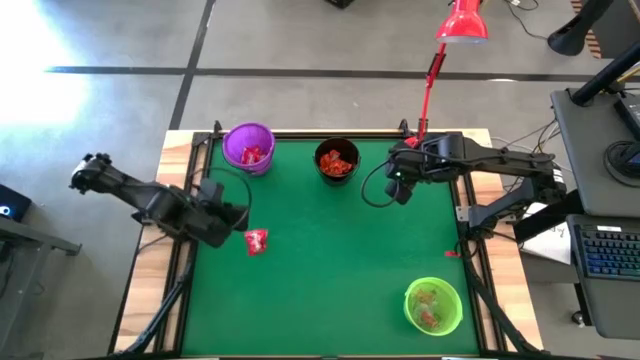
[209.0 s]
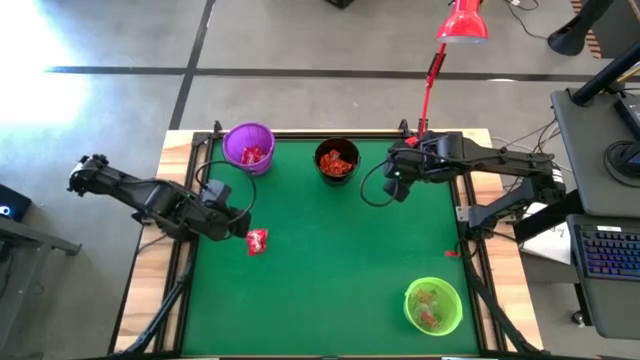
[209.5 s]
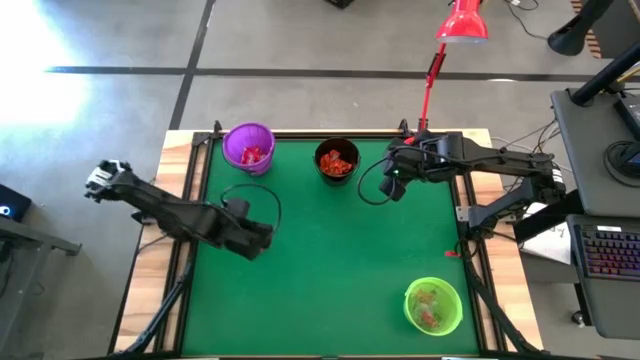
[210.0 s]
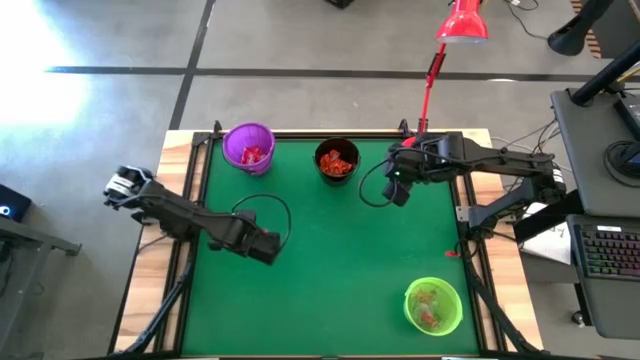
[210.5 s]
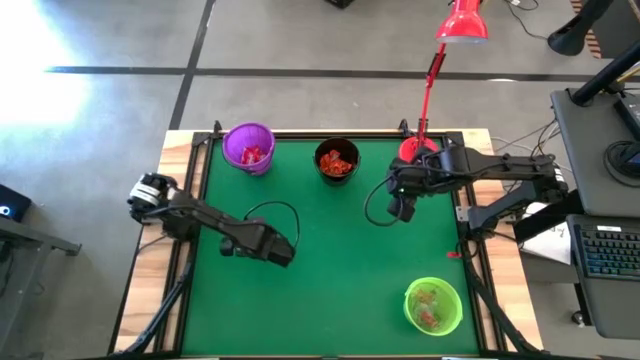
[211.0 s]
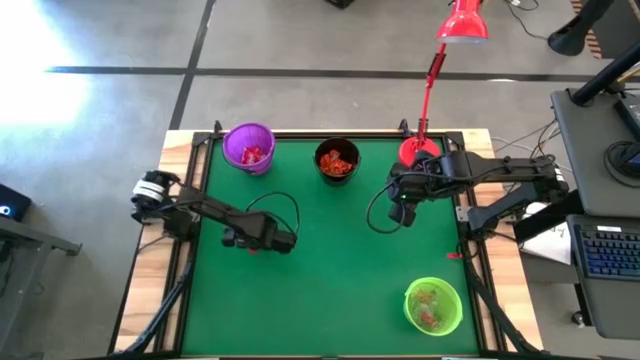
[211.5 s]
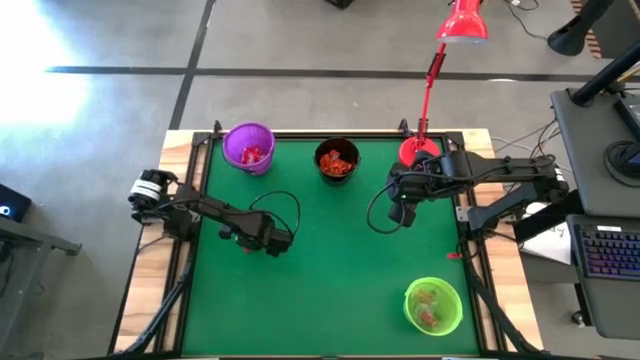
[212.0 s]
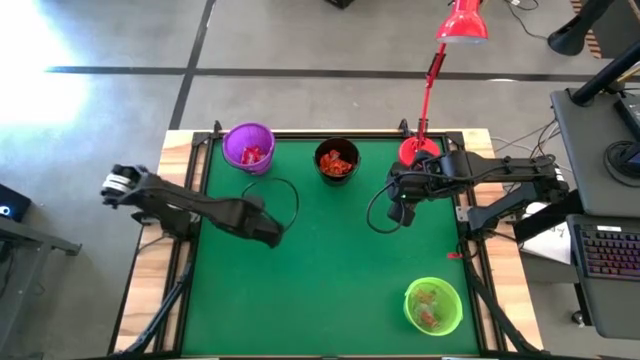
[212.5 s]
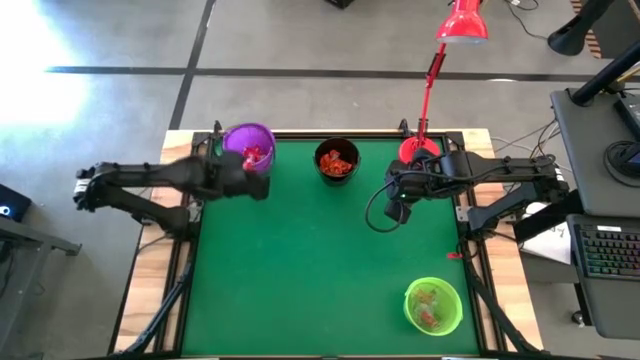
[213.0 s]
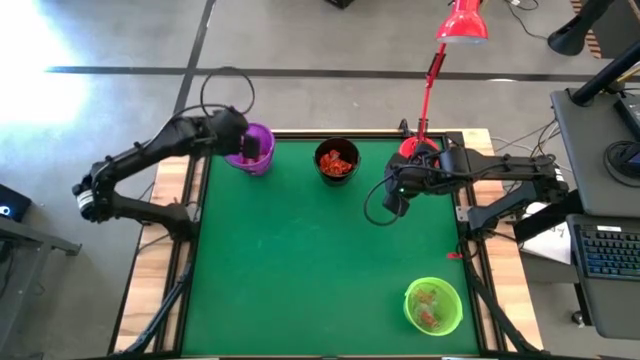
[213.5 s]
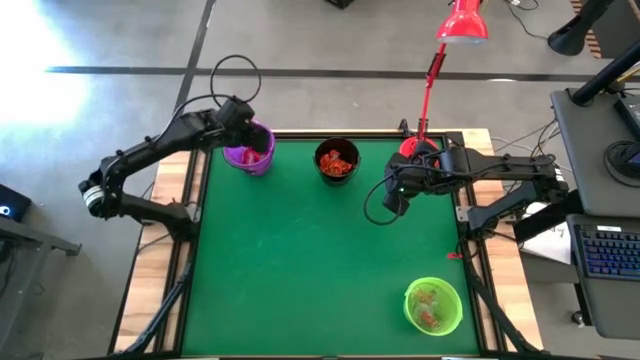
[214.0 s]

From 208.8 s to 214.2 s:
Task: Sort candy
Put the red candy into the purple bucket

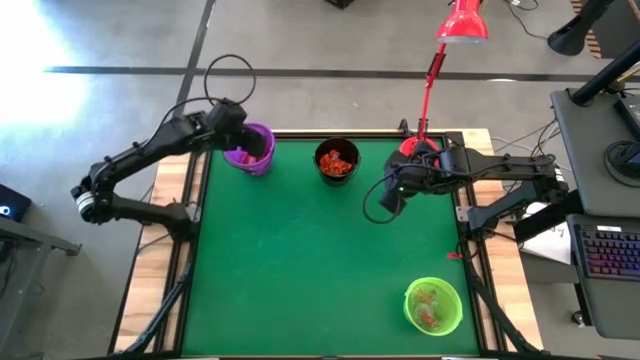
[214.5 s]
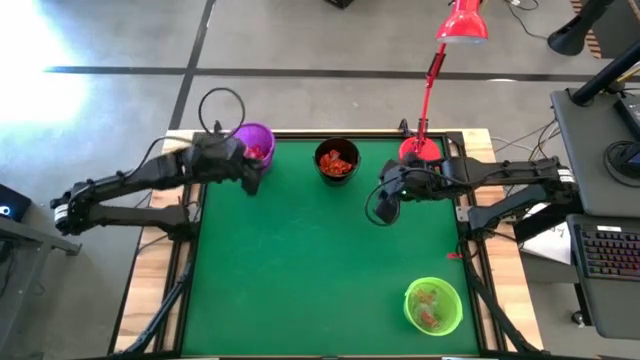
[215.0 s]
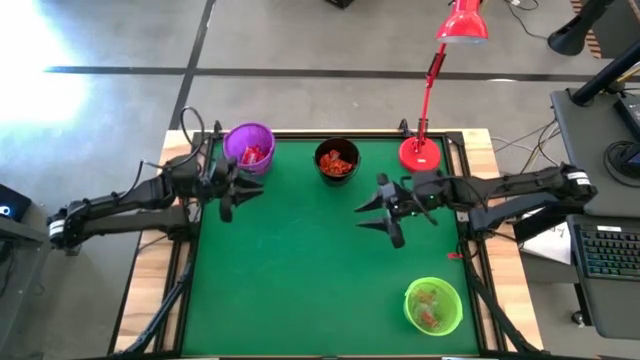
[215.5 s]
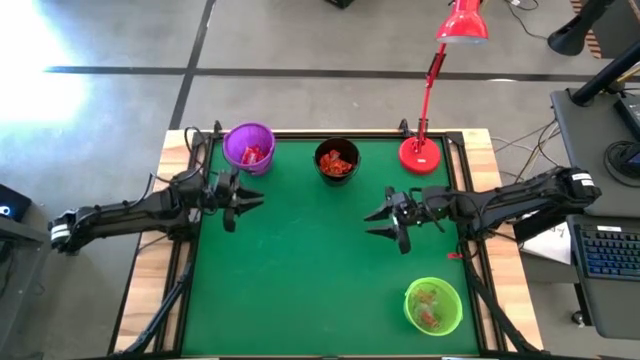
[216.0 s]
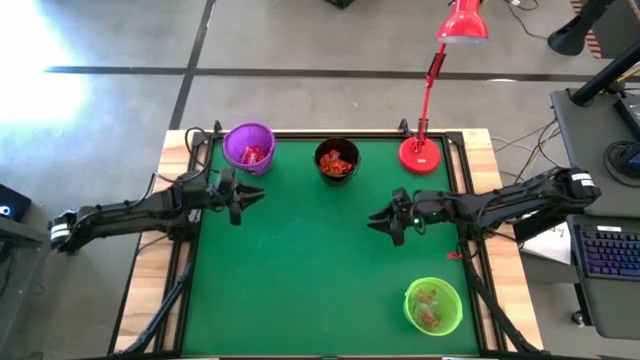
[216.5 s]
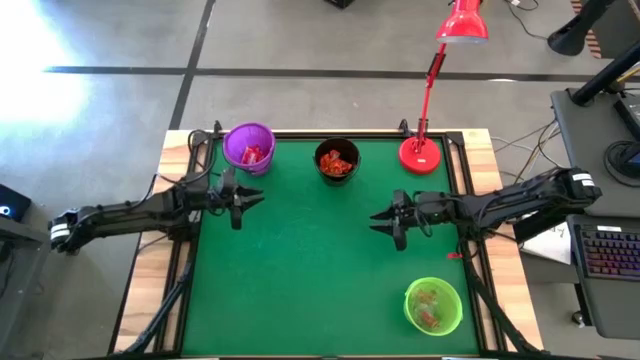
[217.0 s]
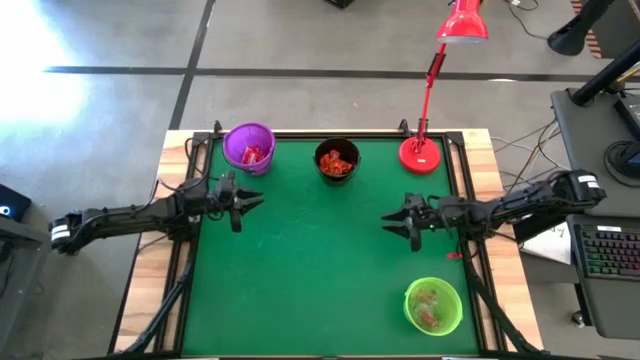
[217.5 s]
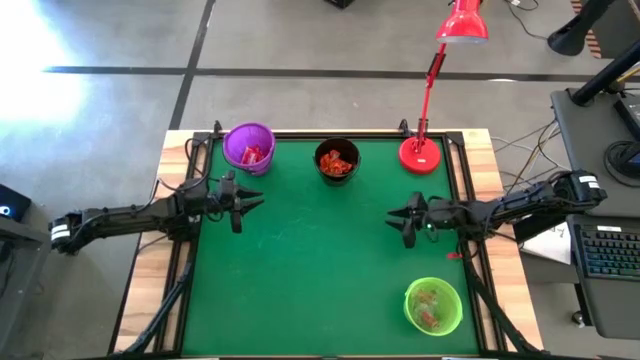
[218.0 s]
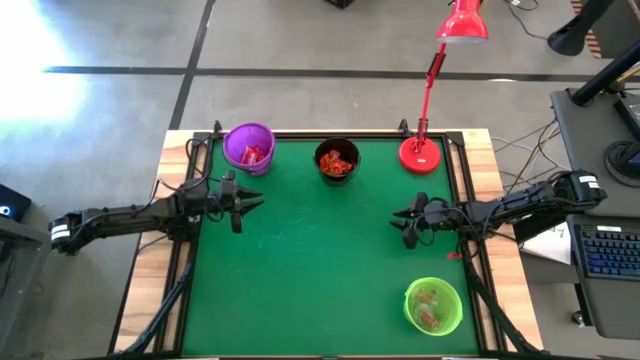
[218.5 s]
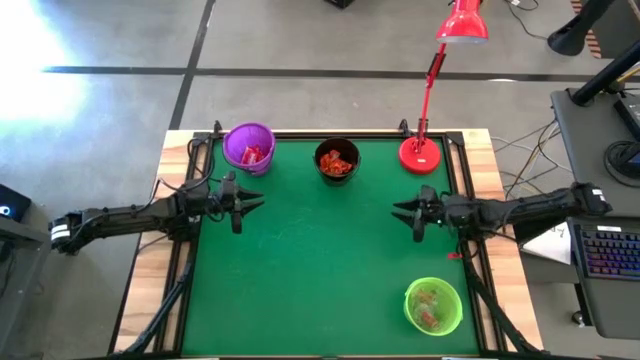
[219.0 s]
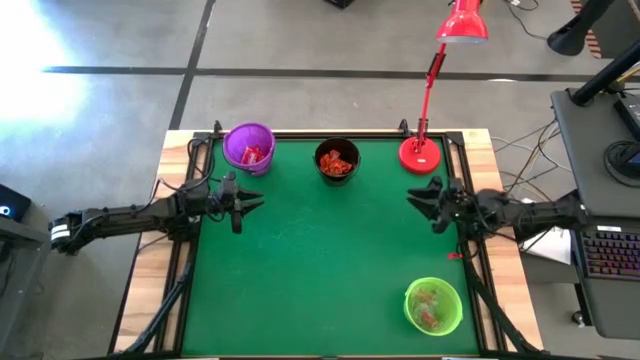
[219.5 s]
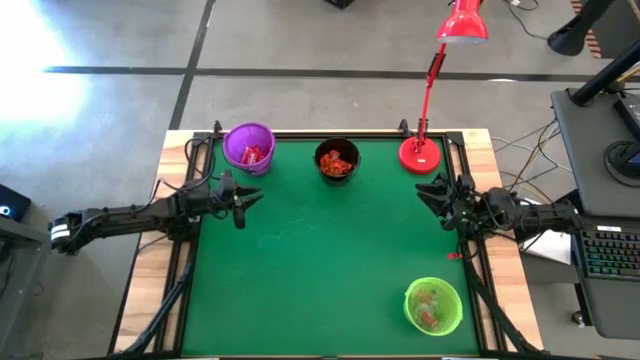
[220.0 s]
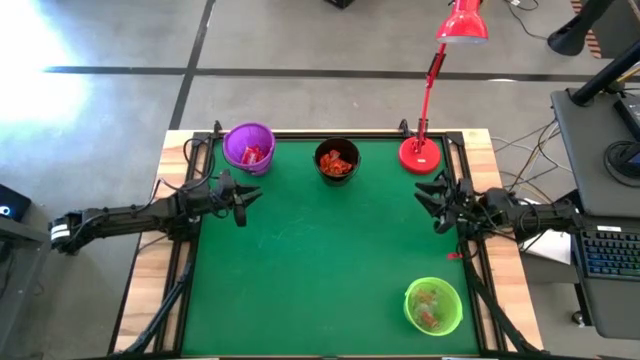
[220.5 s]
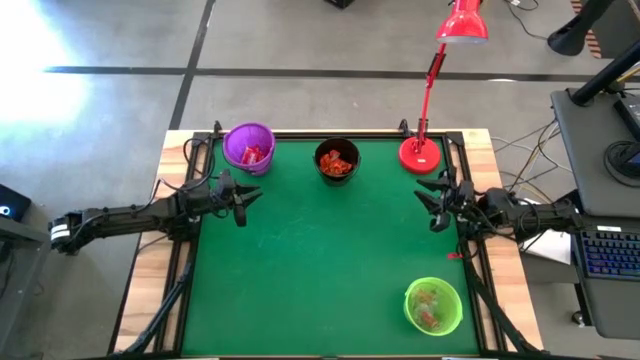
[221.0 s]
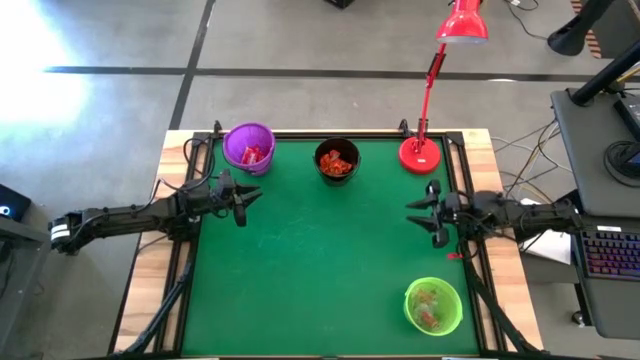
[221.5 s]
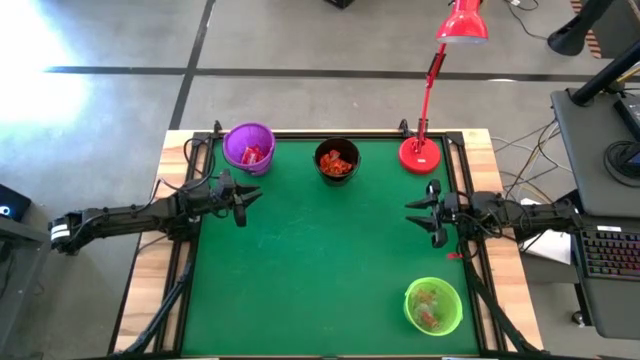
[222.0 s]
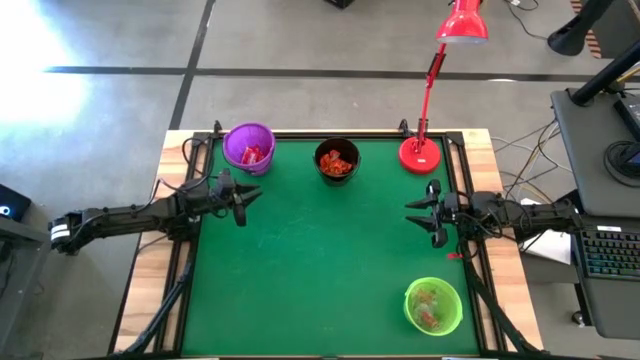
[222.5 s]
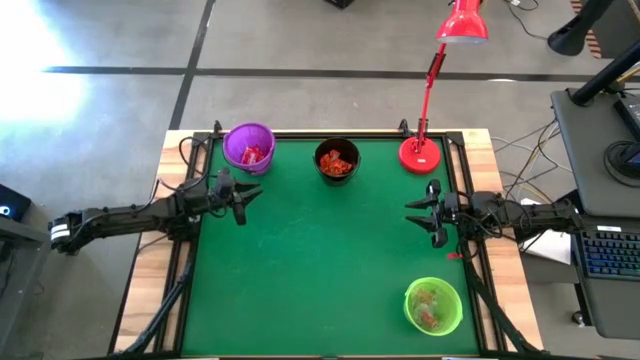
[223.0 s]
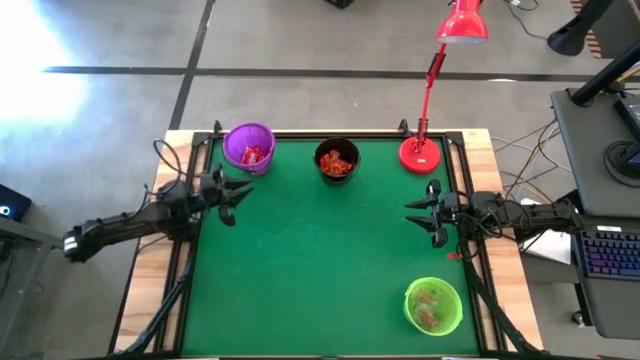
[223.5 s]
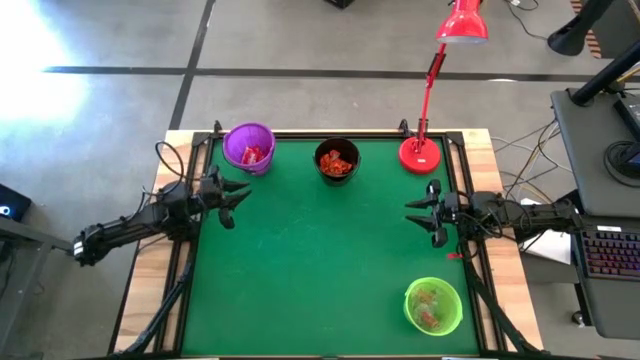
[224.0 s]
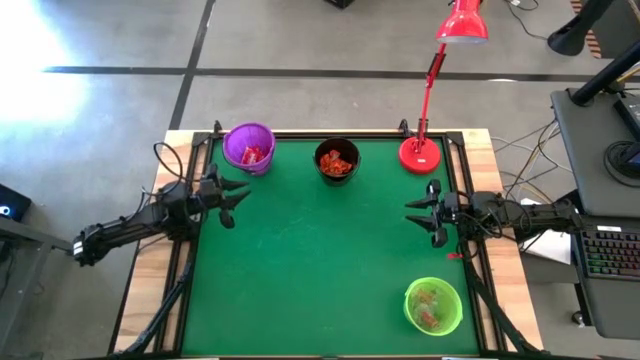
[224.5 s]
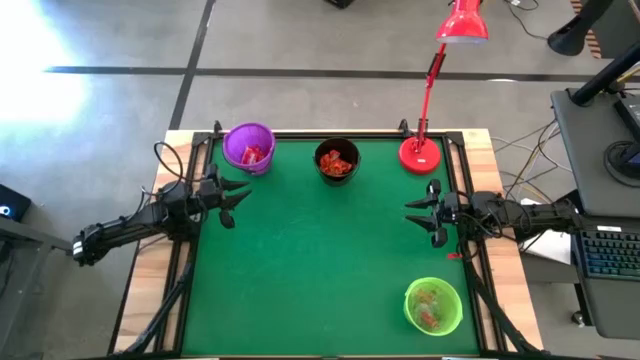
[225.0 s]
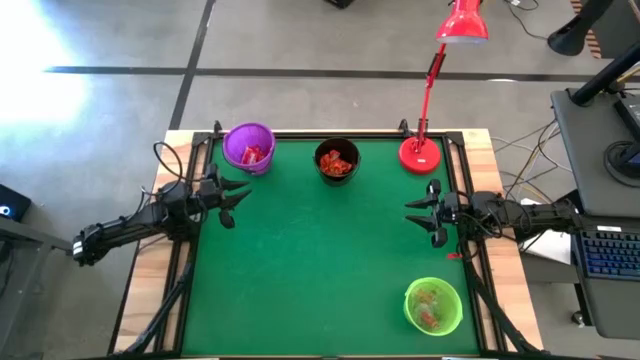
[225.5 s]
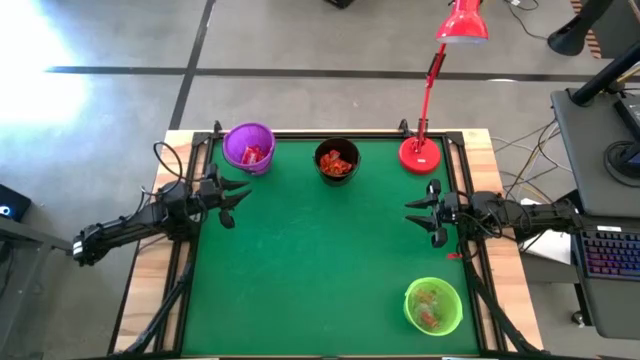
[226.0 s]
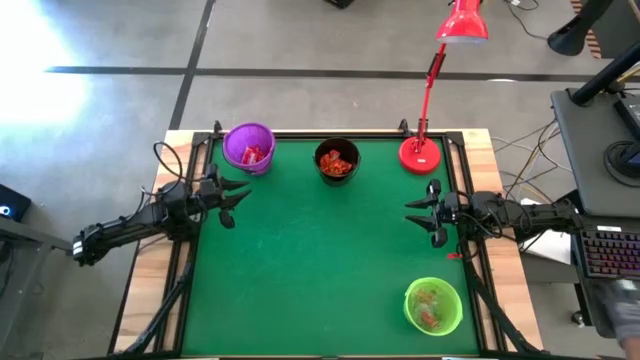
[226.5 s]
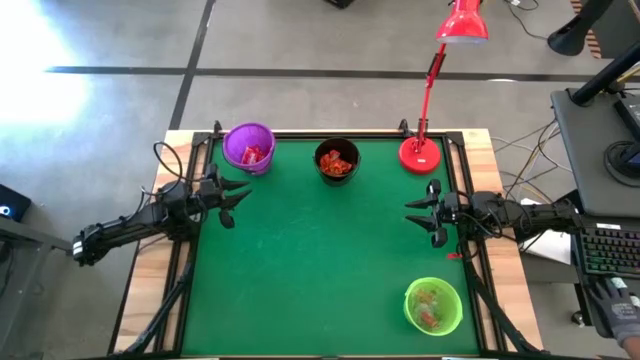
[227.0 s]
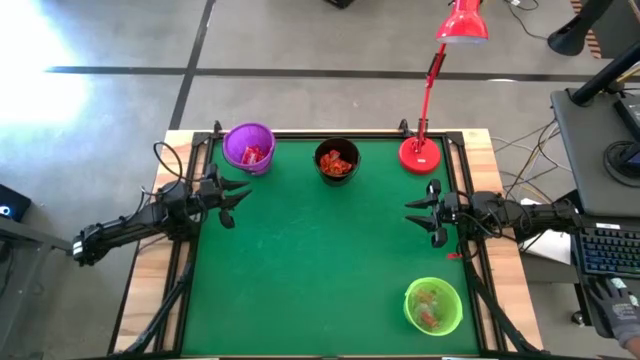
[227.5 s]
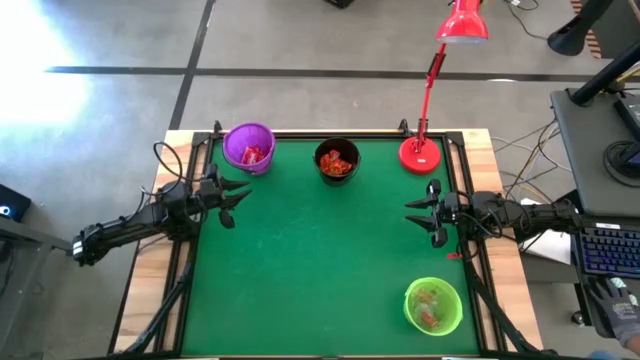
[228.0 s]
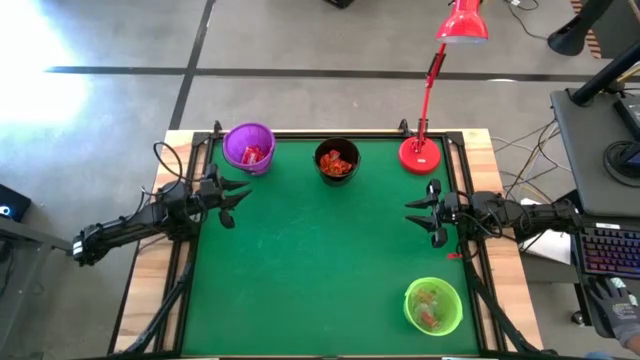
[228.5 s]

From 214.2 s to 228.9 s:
Return to Home Position

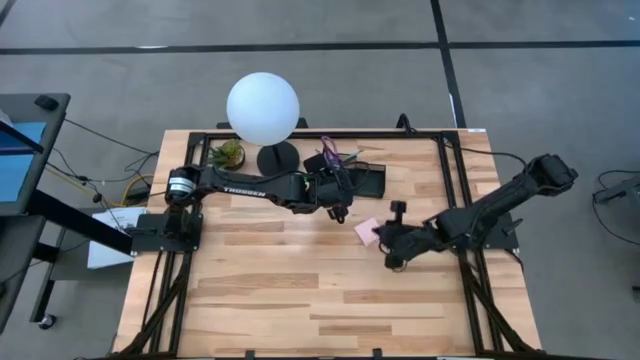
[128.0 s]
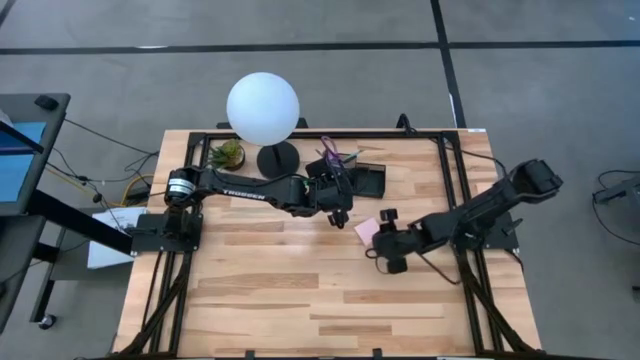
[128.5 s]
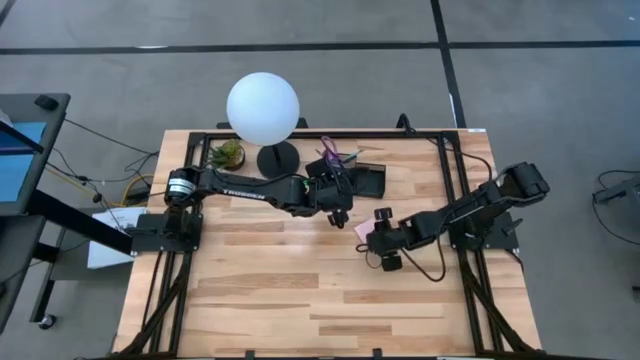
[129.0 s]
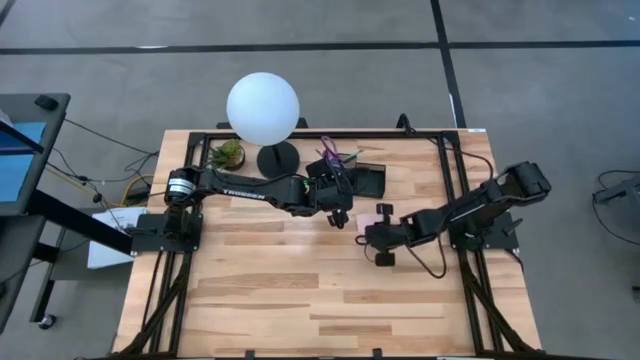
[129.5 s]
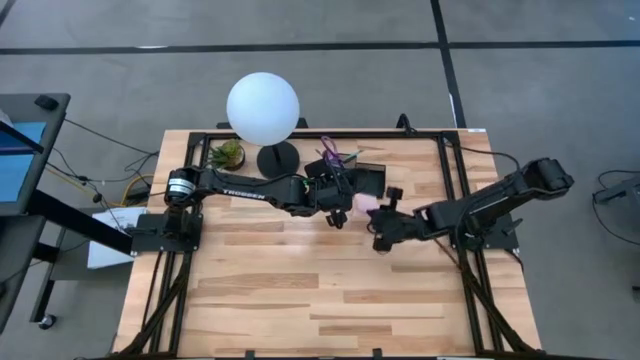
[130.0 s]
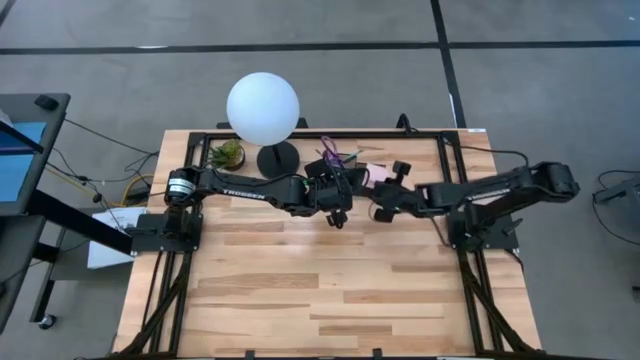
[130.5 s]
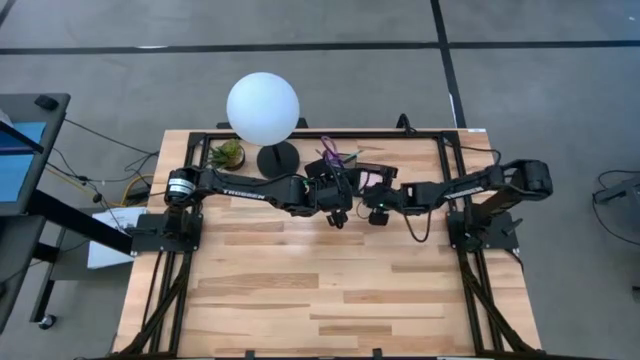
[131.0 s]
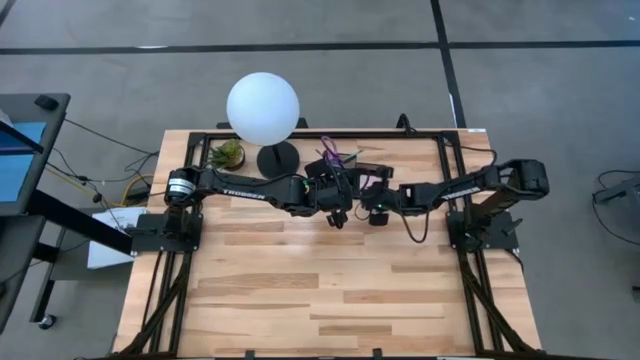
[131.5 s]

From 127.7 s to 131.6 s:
Task: Pick and place office supplies into organizer
Put the pink sticky notes into the black desk organizer
